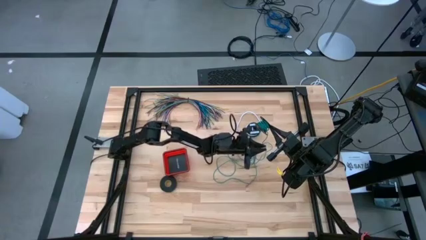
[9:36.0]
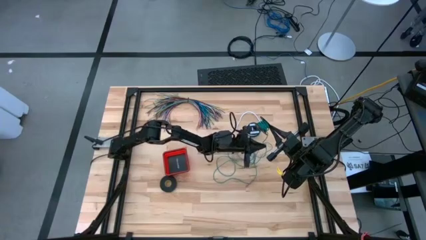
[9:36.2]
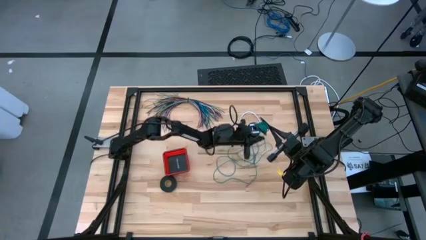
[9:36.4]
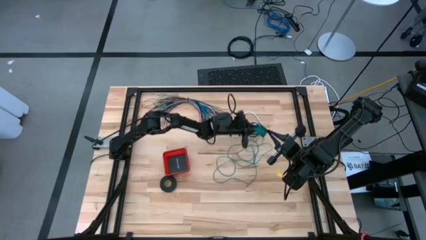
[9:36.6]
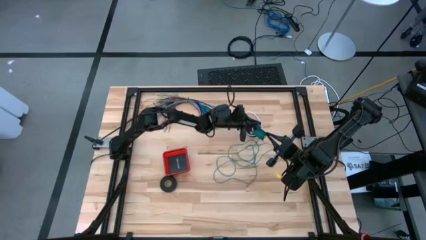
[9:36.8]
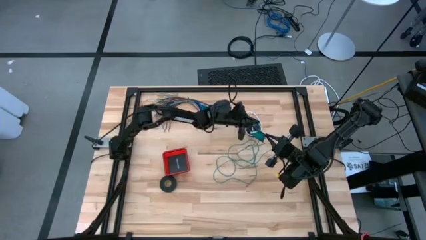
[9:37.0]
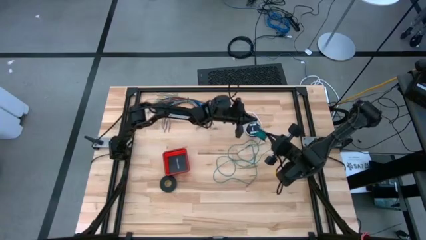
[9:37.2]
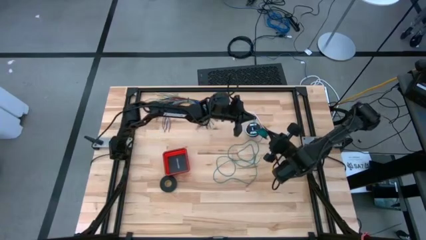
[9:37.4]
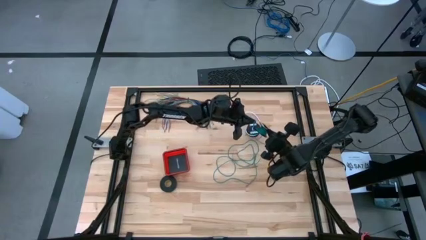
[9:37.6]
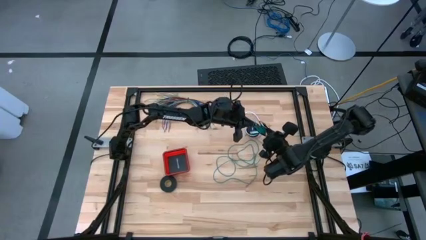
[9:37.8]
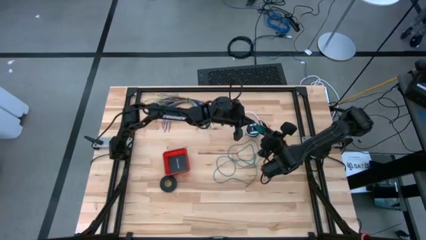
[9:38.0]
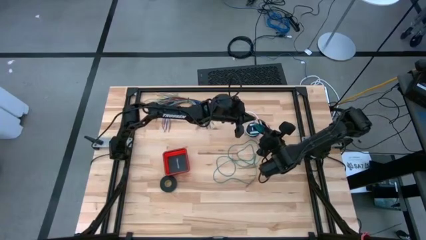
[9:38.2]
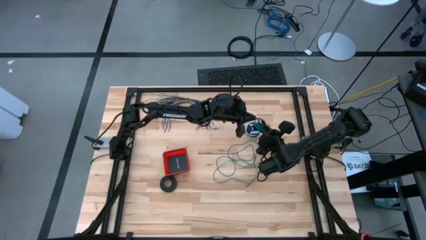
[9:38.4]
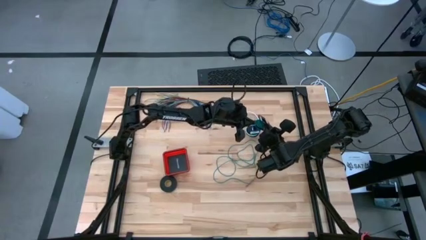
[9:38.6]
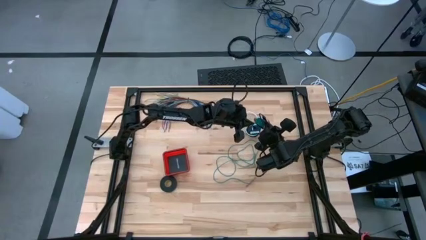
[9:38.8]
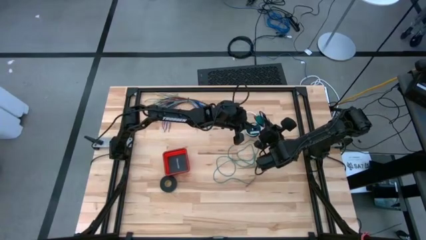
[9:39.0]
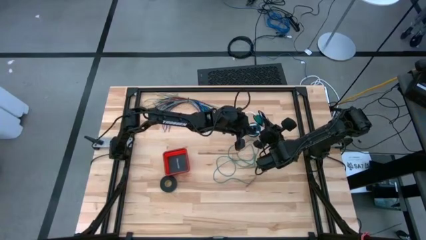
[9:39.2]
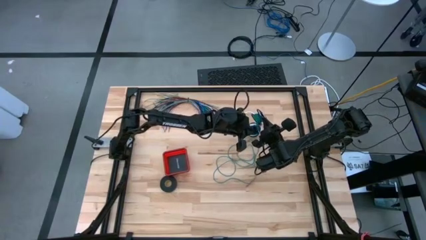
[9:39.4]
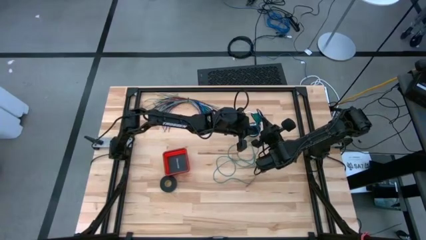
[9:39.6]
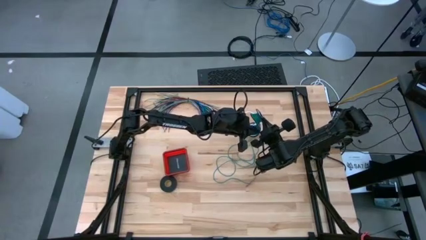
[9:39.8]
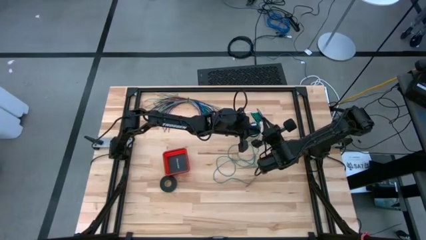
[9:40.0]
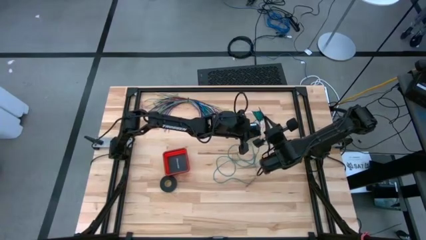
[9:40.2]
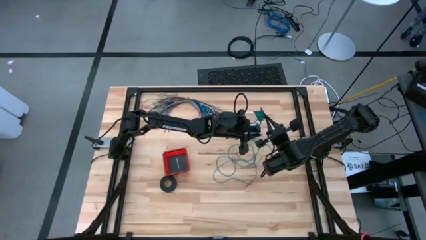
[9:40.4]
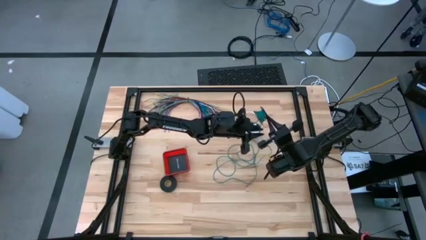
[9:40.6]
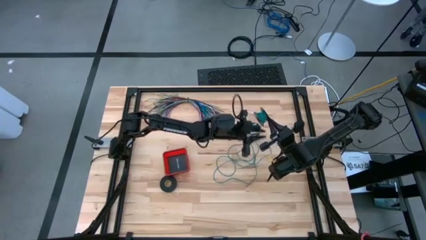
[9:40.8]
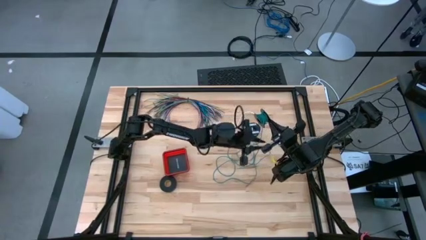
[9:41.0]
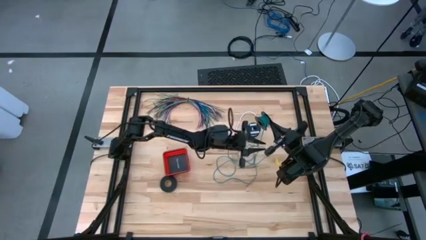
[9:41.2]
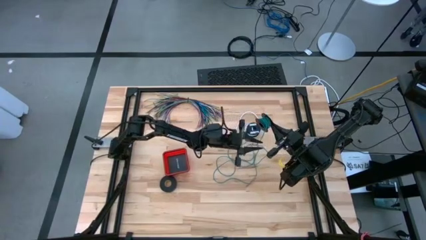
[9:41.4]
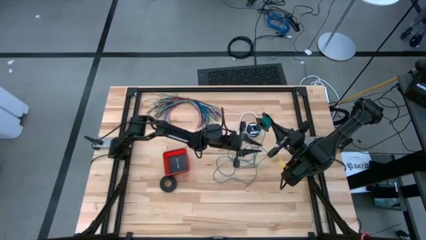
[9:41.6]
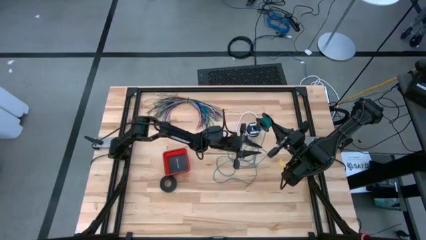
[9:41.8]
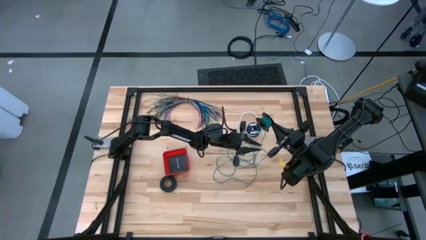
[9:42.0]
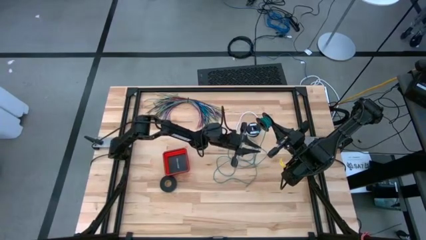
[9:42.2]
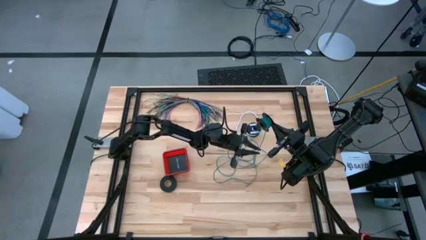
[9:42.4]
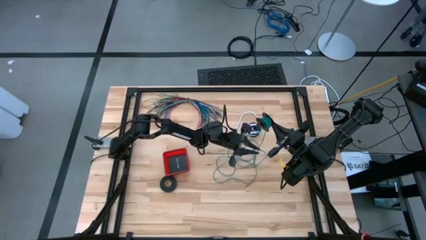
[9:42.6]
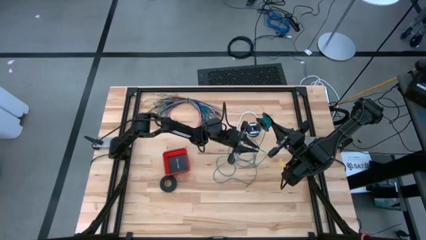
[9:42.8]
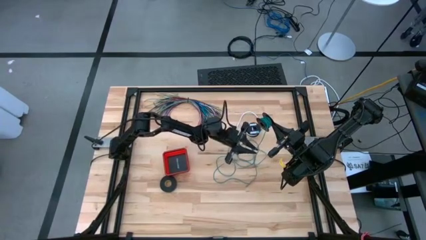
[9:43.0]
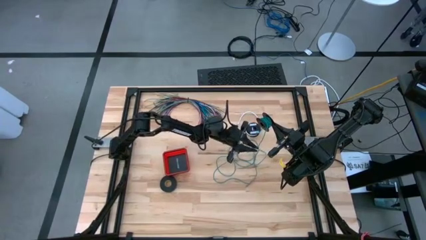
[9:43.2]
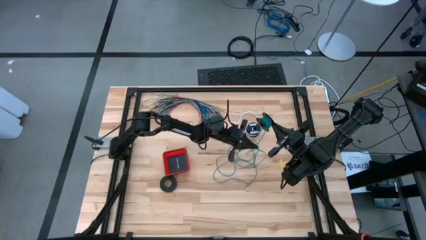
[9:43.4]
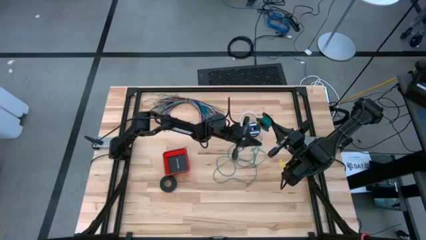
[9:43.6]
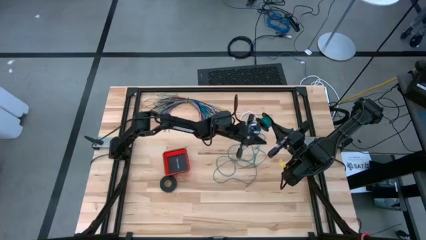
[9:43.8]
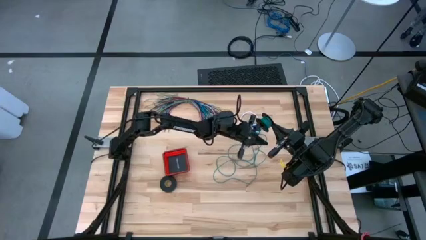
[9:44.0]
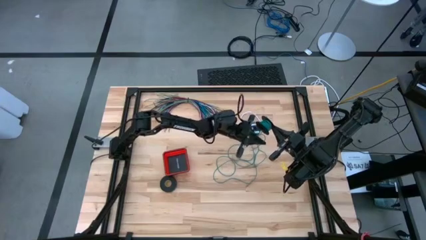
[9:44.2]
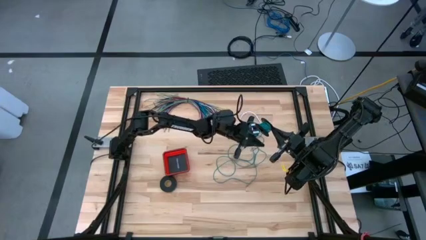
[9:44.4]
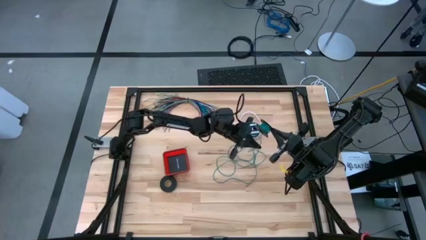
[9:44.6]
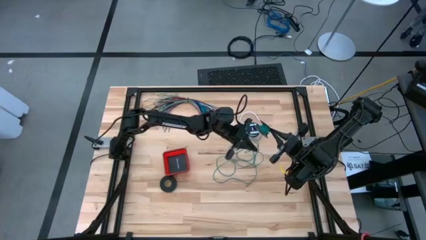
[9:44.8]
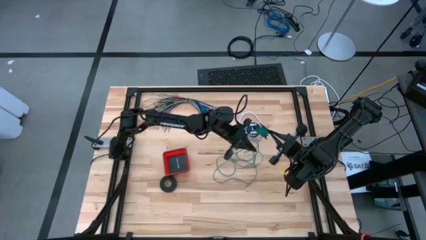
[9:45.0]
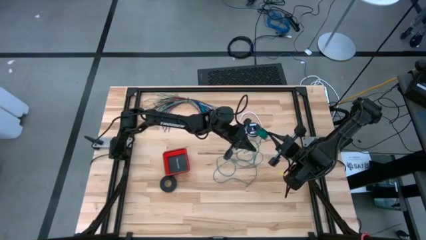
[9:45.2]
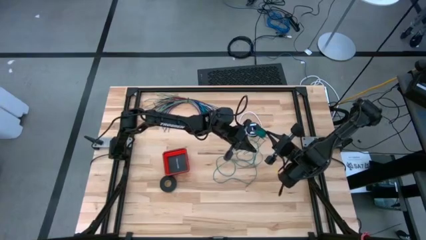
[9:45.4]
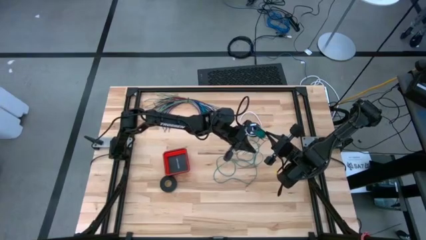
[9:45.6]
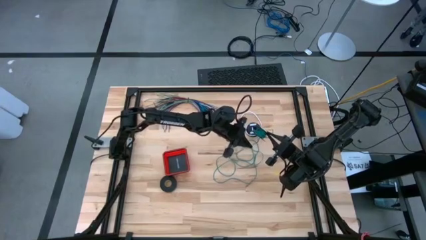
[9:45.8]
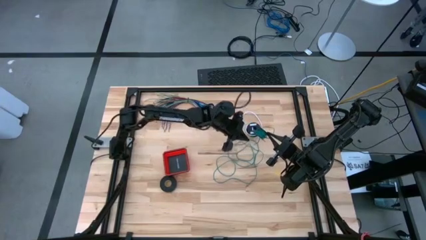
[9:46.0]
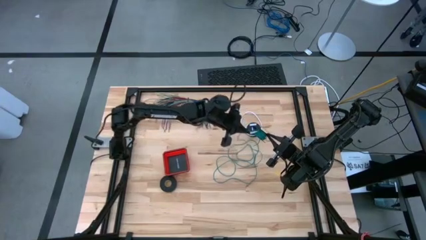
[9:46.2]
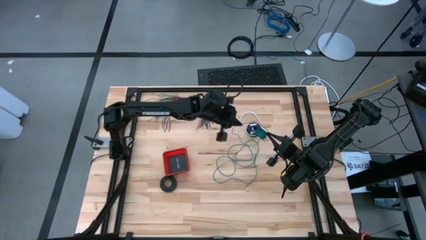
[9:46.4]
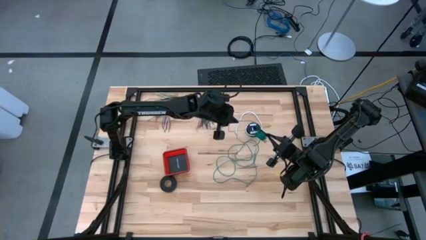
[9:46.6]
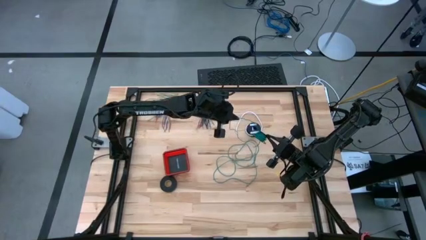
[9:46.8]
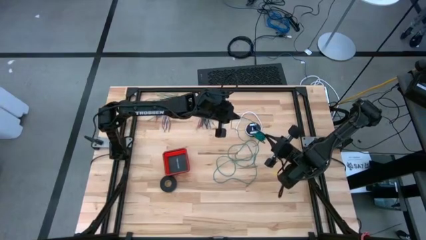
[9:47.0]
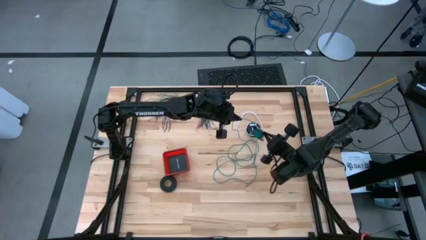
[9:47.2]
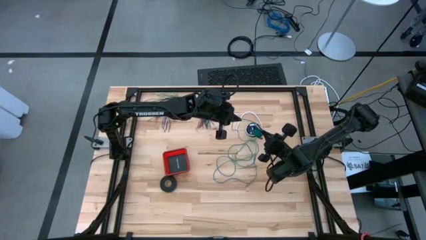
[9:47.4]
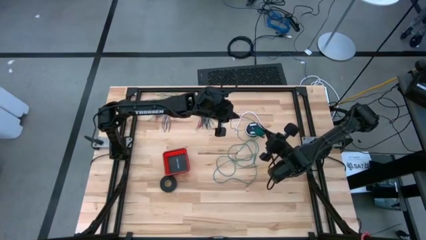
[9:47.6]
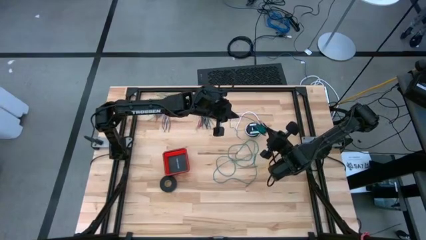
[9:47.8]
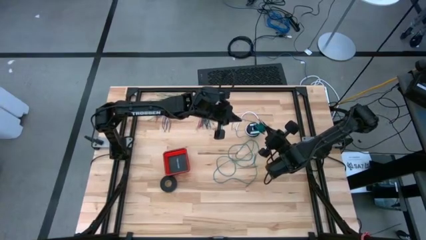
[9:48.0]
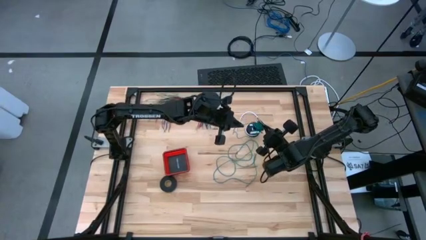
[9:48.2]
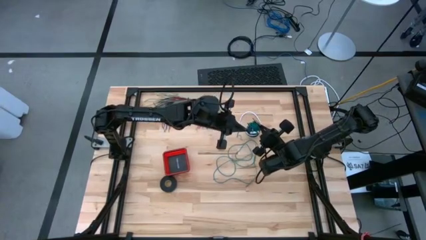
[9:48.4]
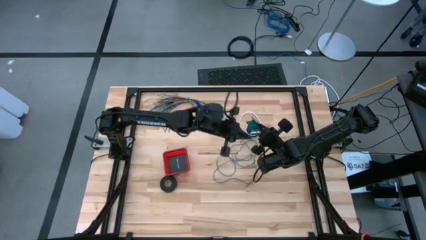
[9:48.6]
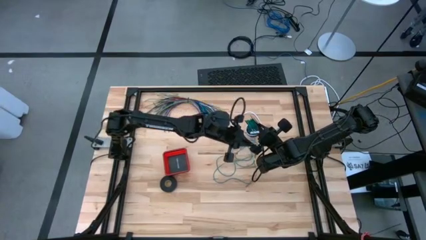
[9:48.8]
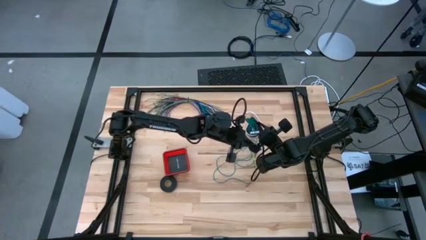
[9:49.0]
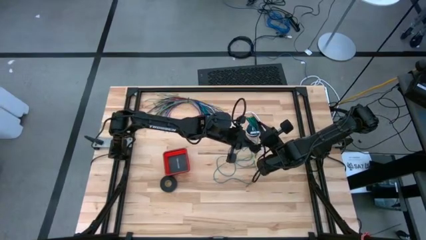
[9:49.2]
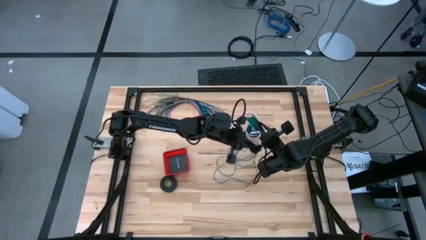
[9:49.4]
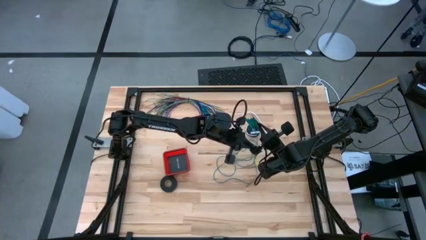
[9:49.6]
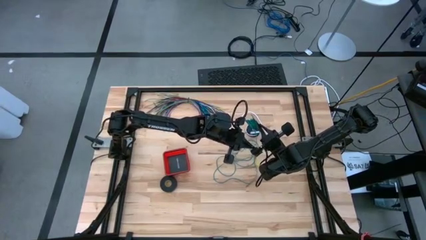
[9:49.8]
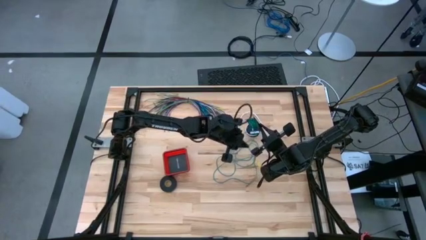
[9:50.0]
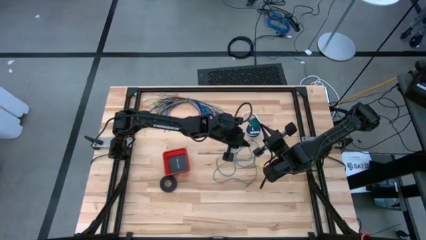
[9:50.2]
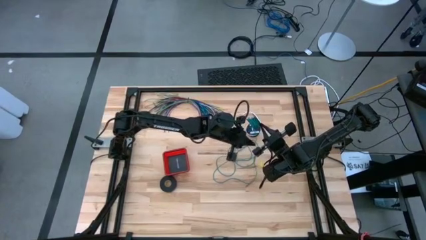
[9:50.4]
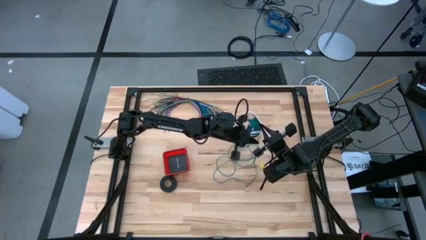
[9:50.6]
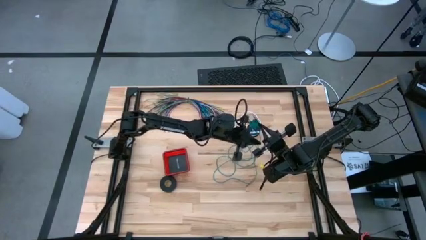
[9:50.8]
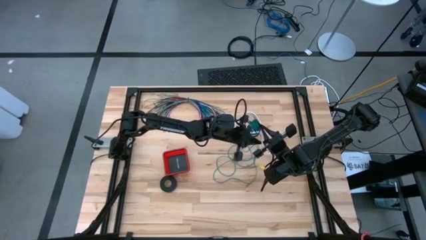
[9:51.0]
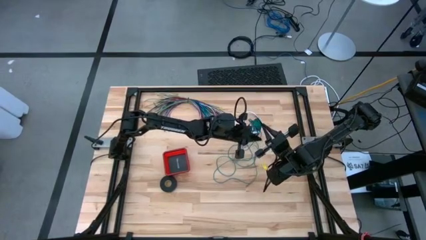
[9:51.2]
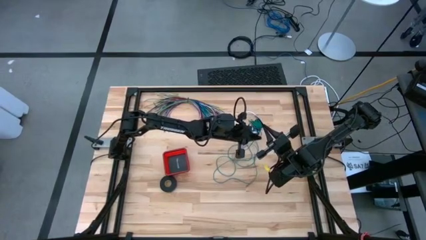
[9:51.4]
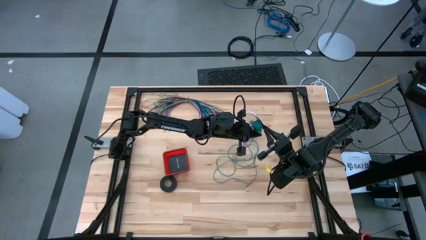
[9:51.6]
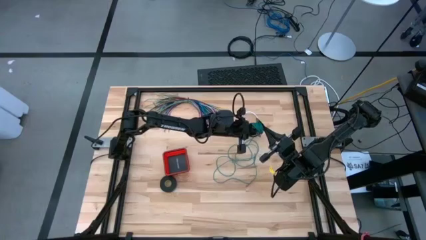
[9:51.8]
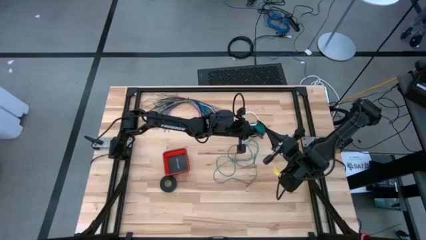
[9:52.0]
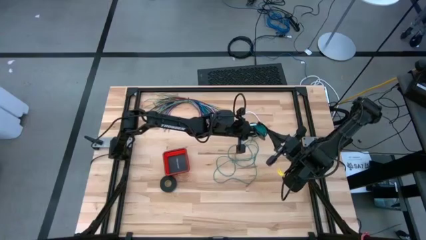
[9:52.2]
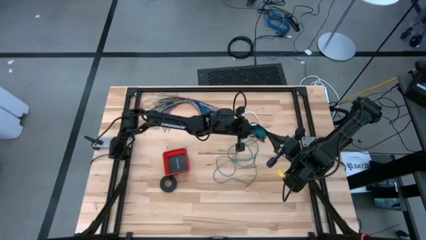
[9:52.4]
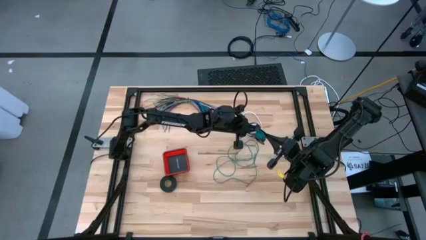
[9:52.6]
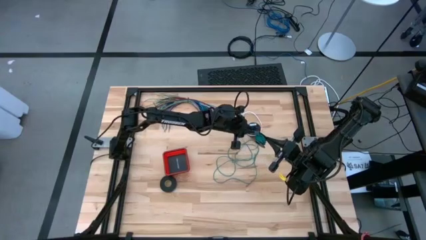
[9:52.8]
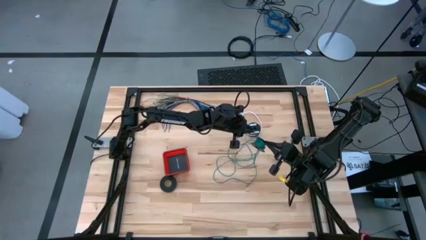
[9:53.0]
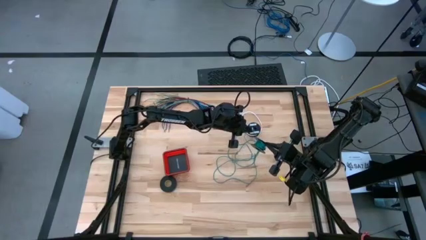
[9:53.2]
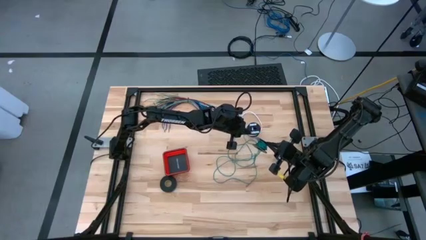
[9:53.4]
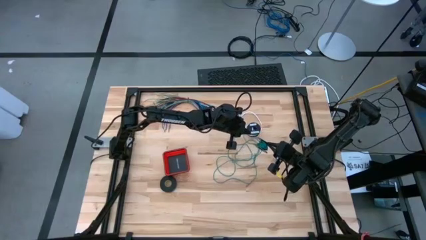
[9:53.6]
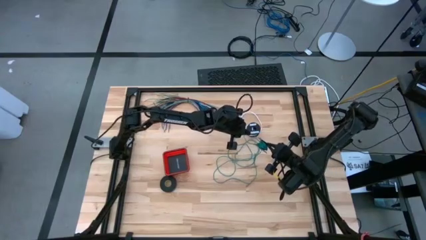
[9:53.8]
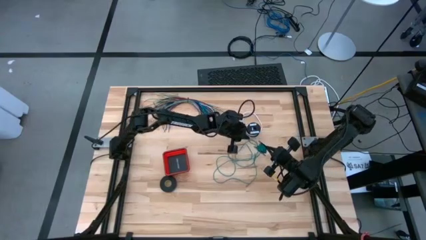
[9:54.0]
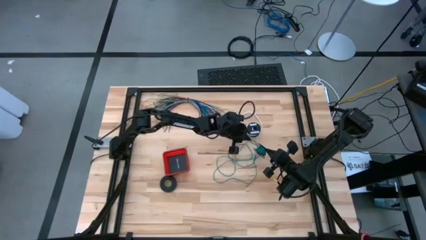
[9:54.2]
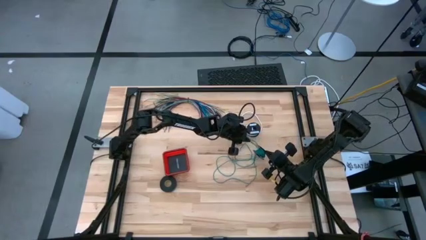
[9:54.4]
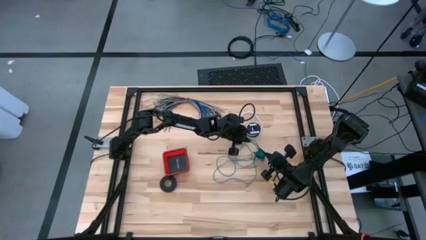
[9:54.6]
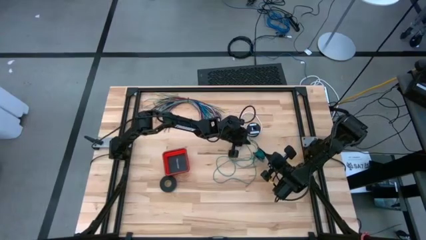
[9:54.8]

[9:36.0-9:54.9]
Task: Coil cords
Coil the green wire onto the spool
